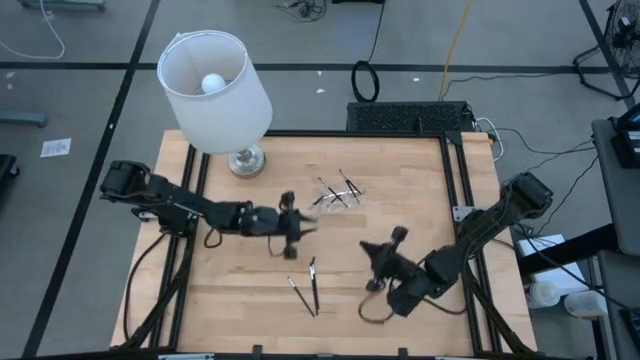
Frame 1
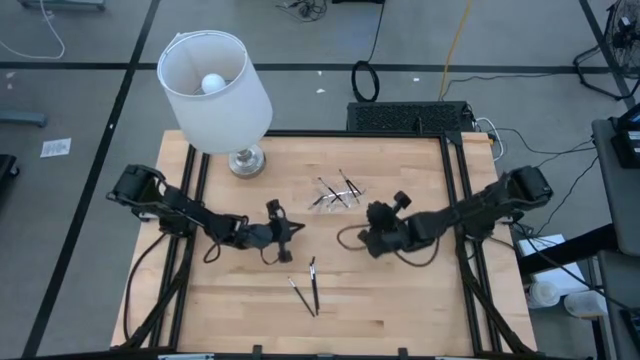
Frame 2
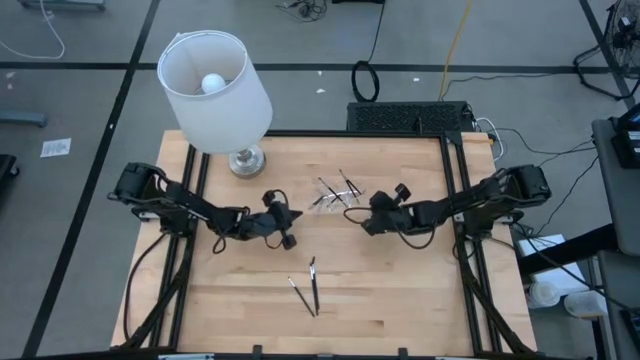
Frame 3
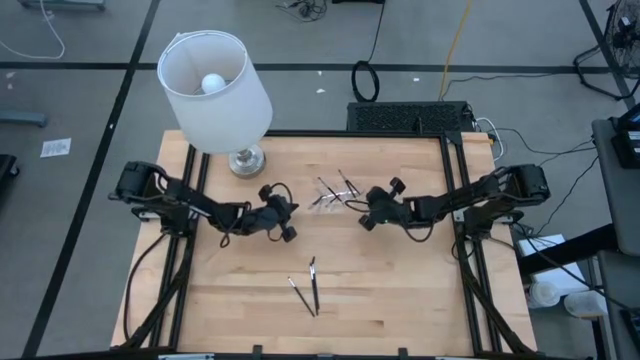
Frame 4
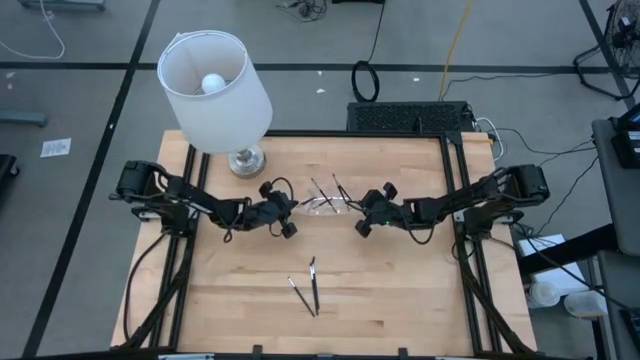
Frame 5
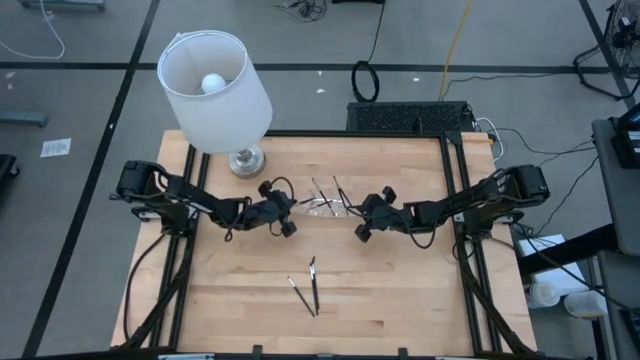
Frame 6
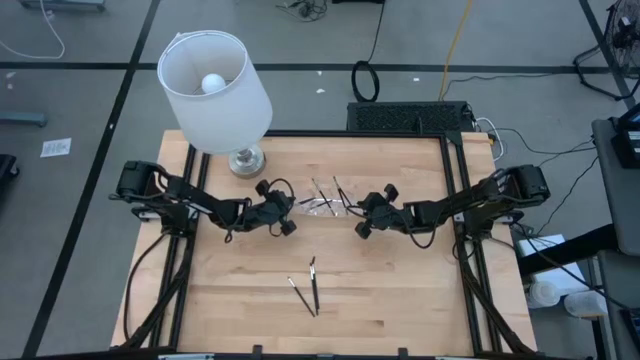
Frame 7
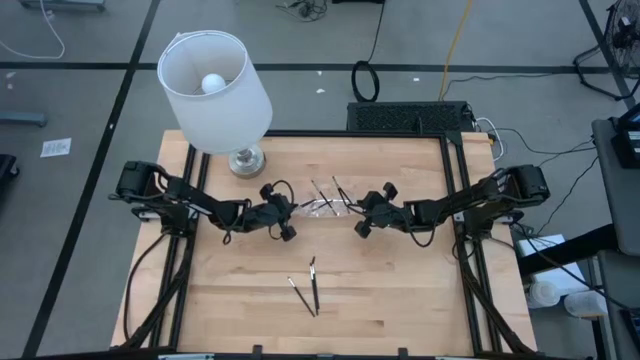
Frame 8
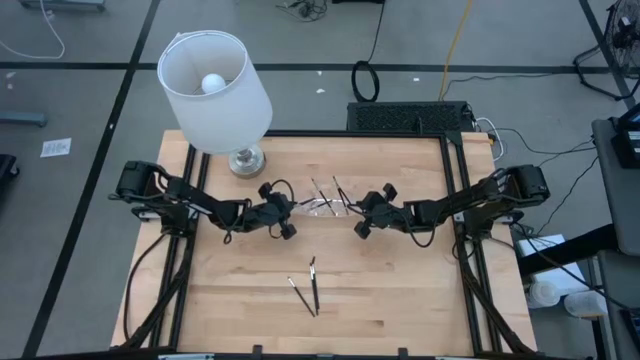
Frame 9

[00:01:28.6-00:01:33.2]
Task: Put items in baskets/containers
Adjust the transparent organizer

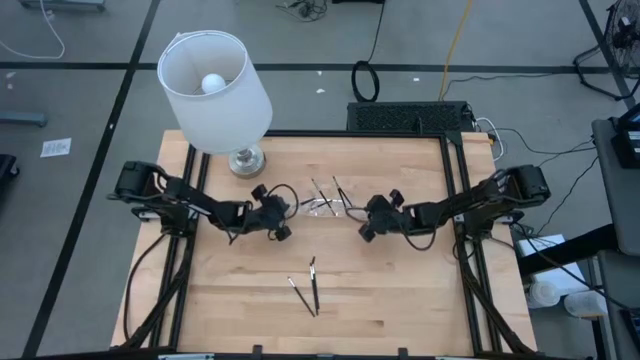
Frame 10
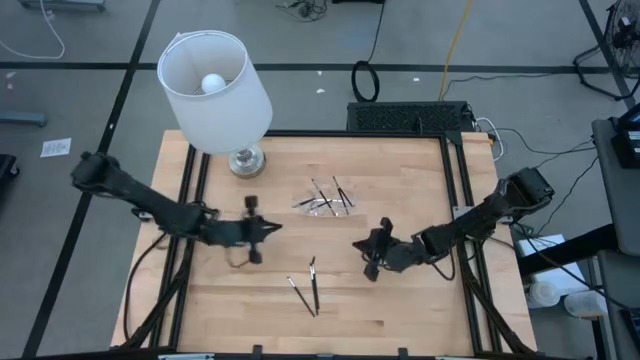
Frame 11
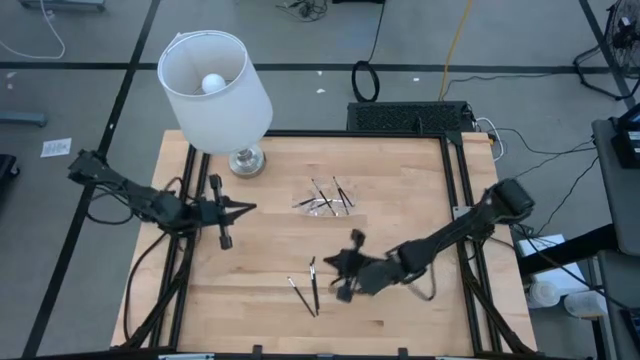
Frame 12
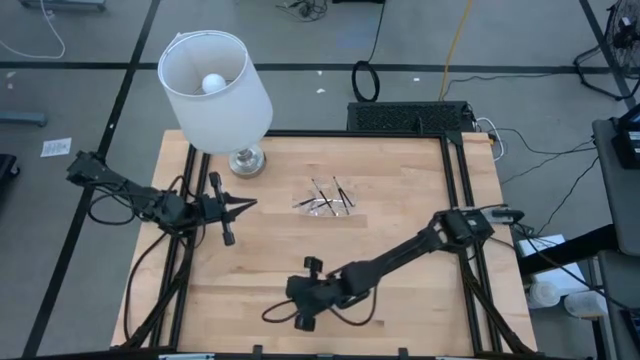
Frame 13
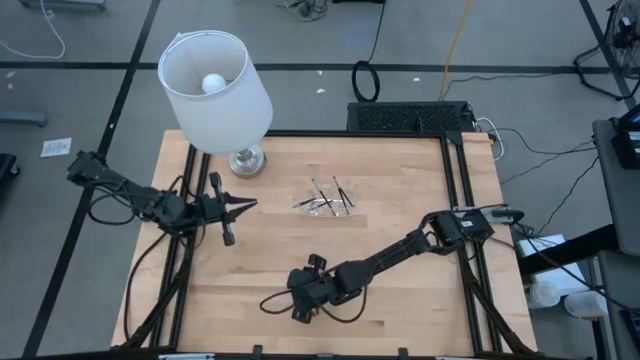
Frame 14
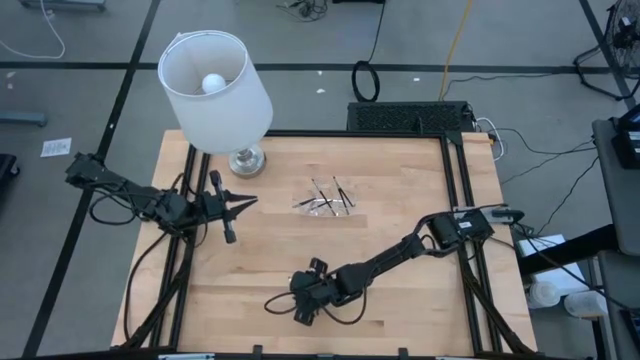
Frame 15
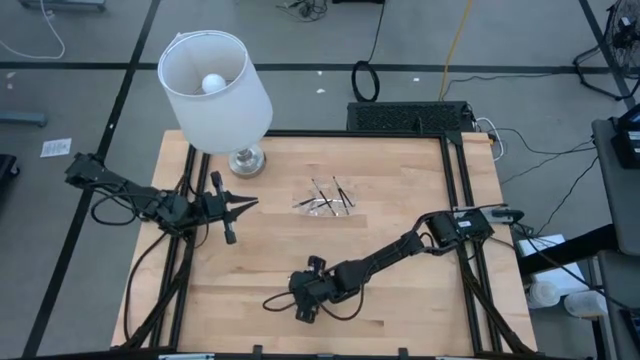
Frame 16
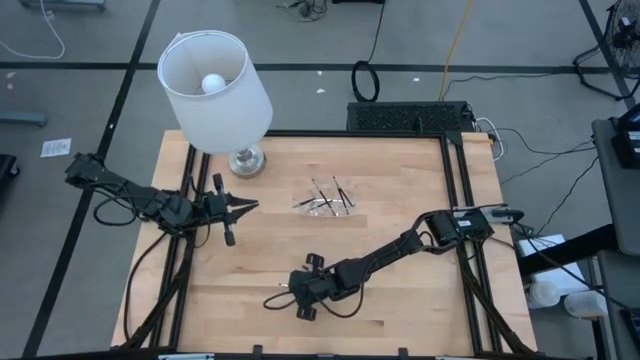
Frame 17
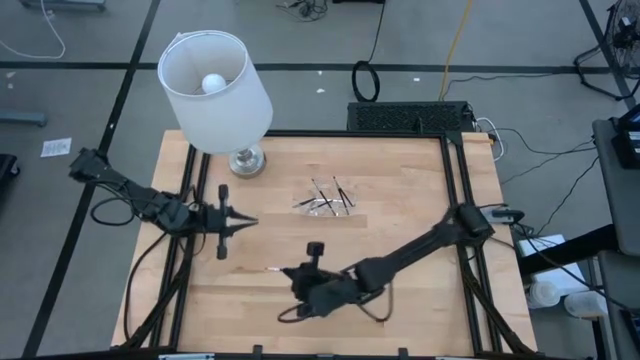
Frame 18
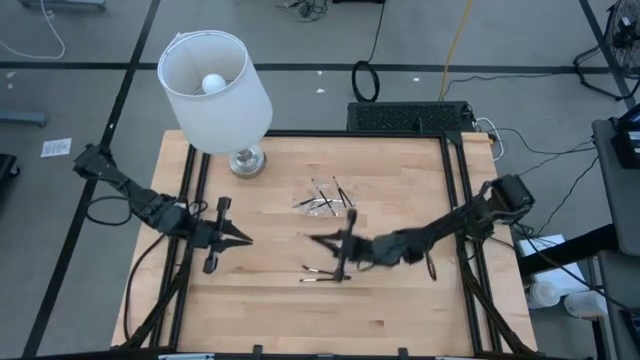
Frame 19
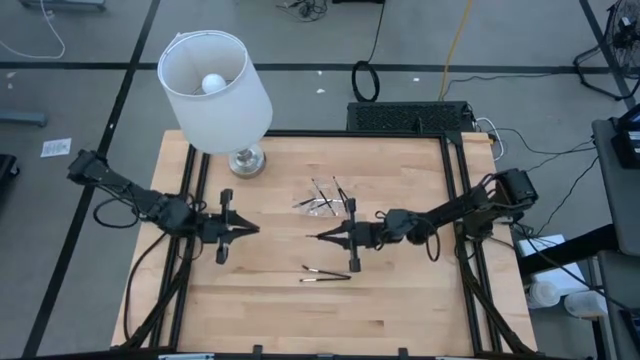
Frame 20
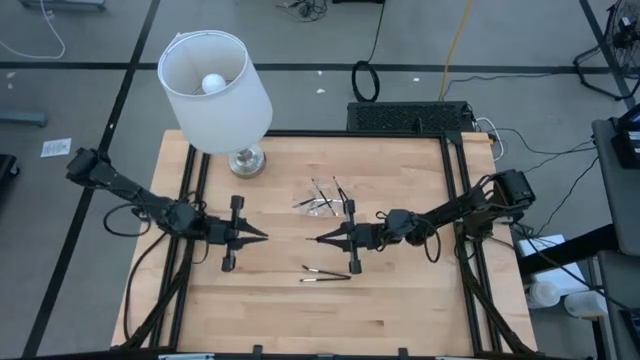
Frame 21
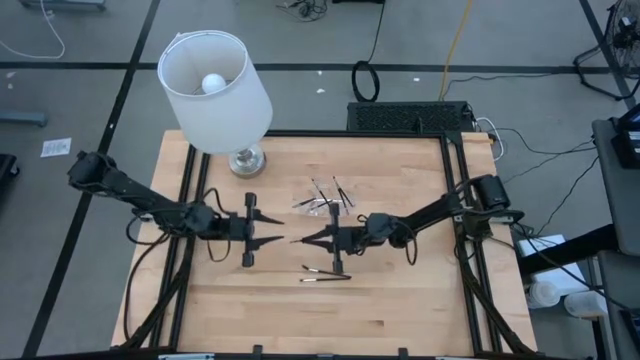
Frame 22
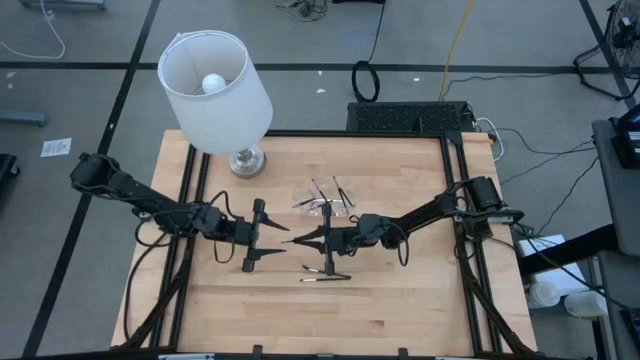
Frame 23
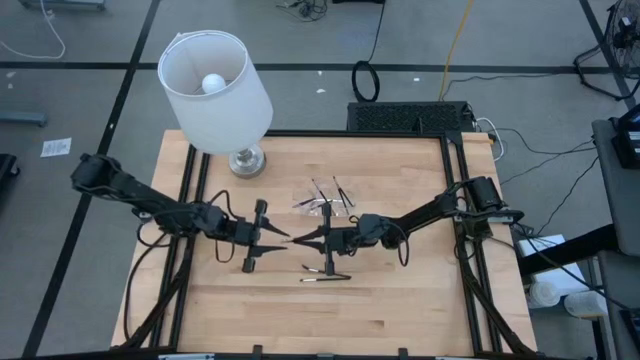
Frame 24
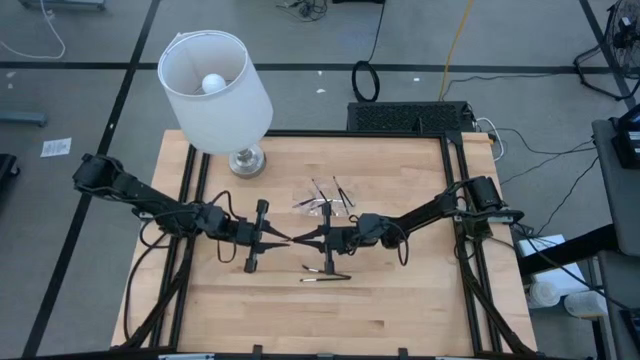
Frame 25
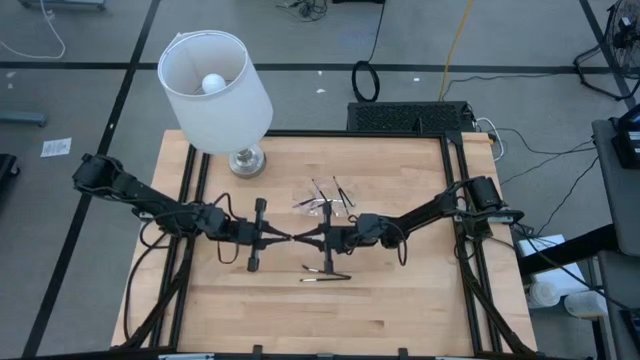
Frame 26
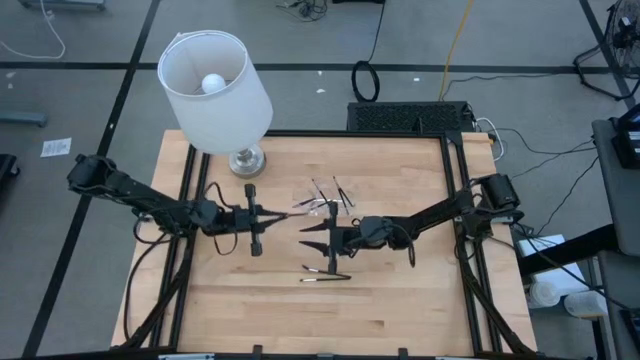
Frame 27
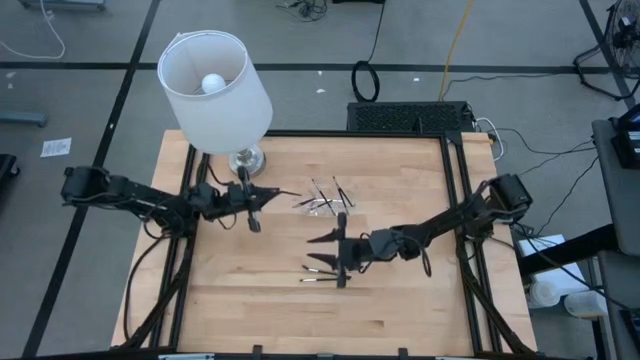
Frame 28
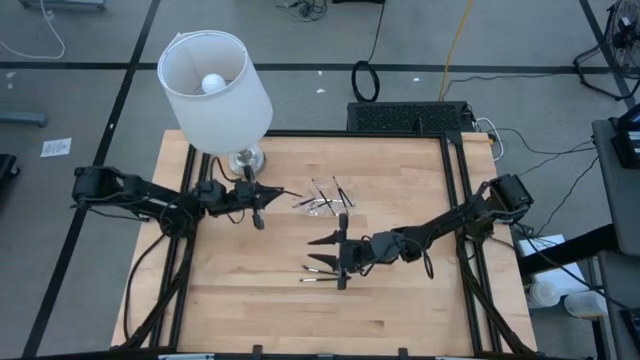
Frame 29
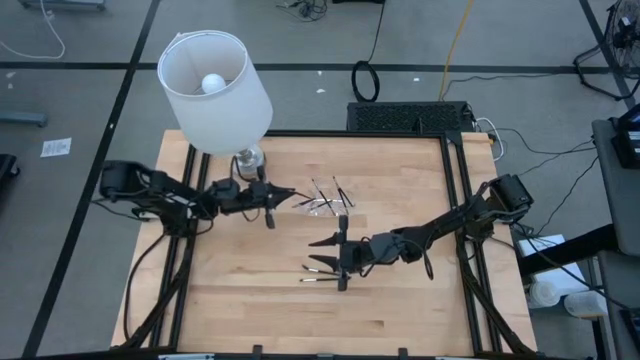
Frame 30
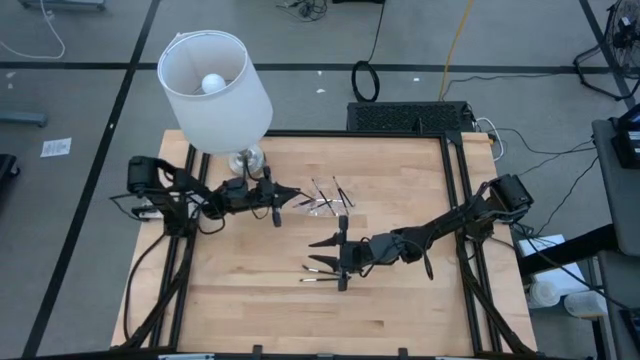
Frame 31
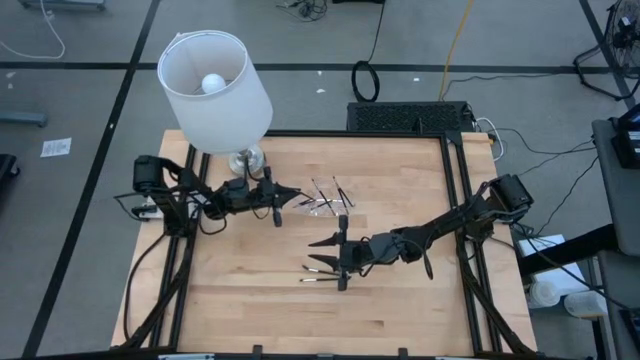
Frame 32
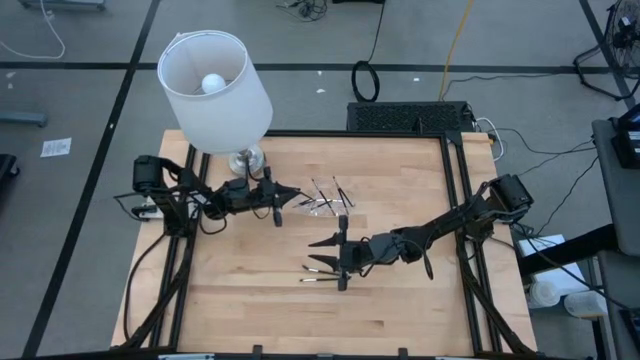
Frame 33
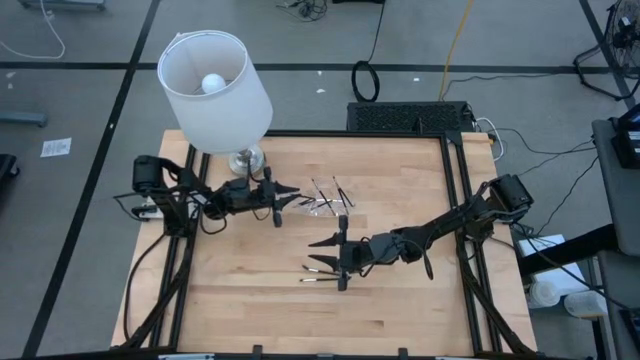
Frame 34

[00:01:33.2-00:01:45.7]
Put the eyeshadow brush into the transparent organizer

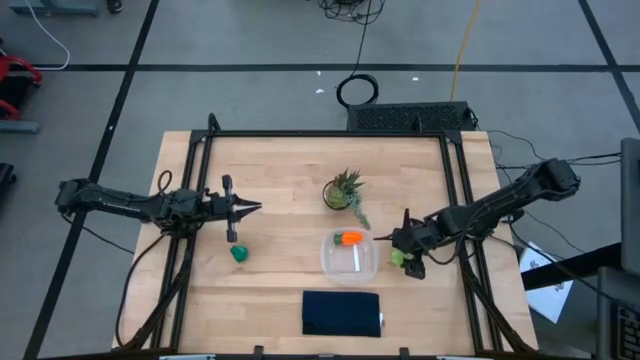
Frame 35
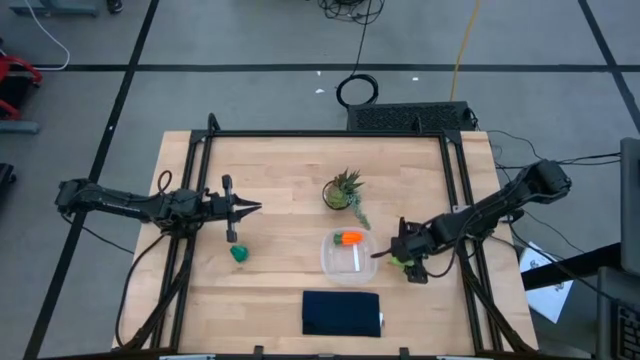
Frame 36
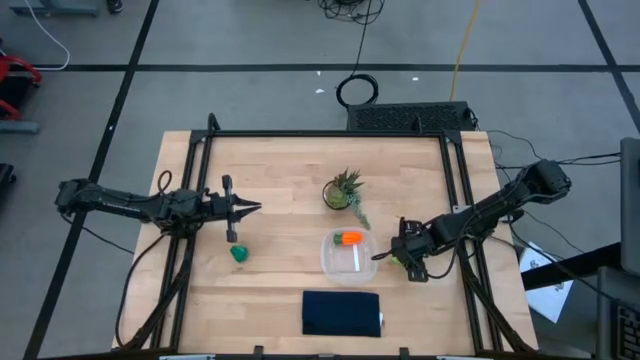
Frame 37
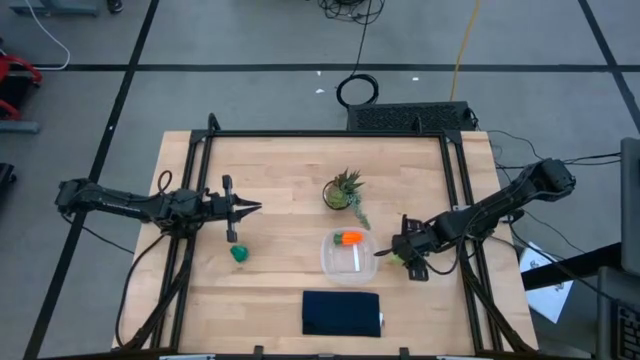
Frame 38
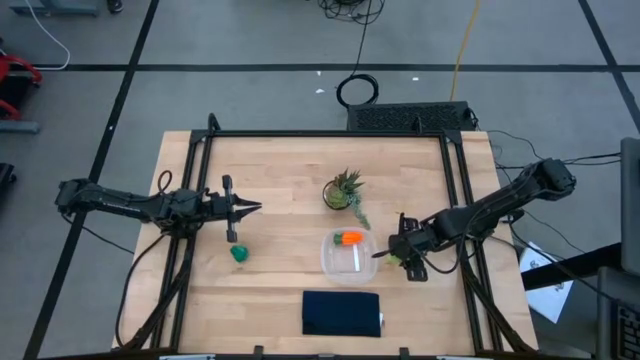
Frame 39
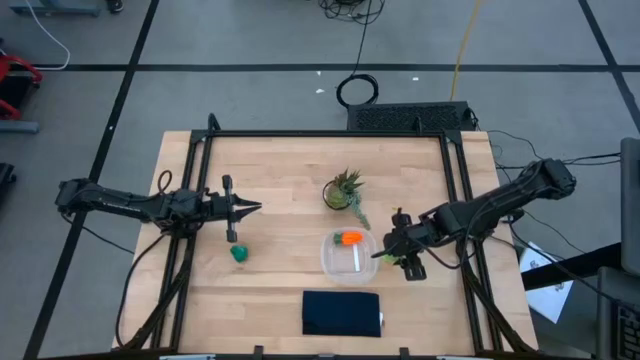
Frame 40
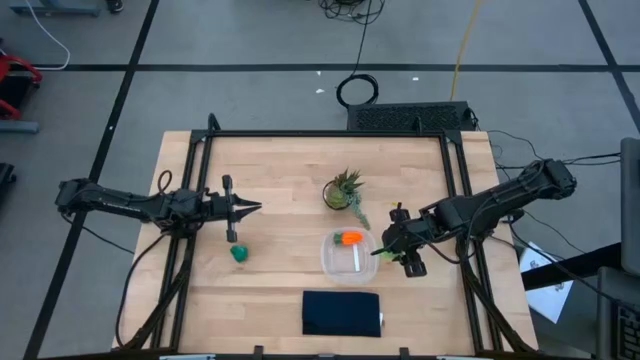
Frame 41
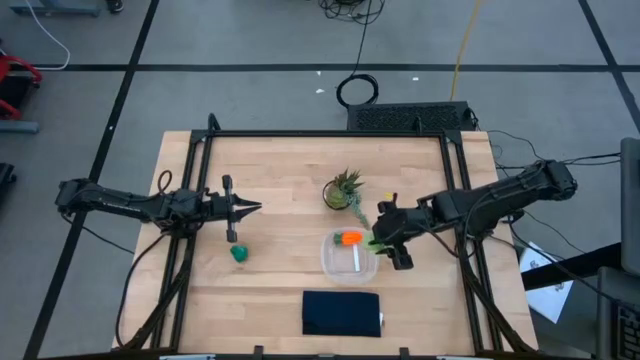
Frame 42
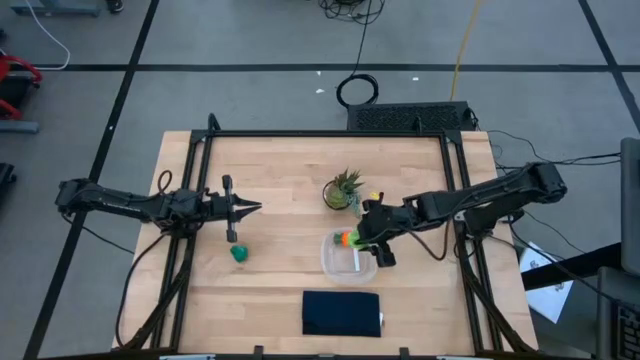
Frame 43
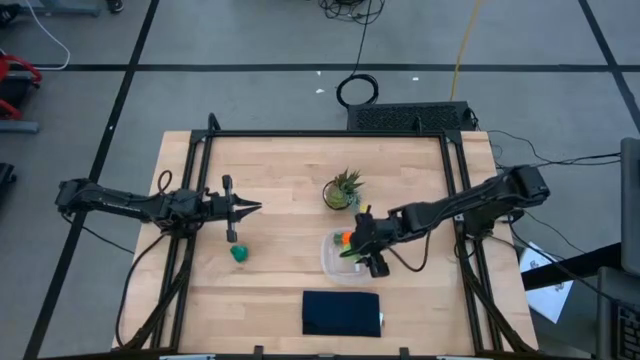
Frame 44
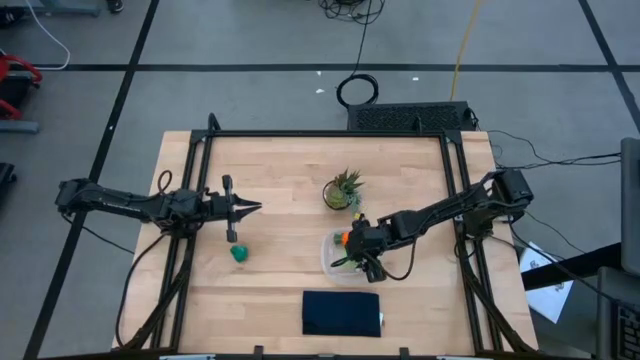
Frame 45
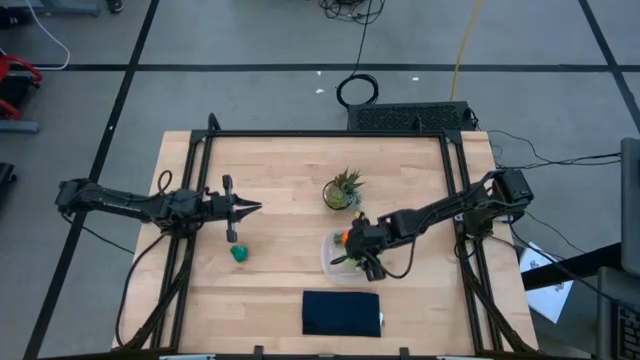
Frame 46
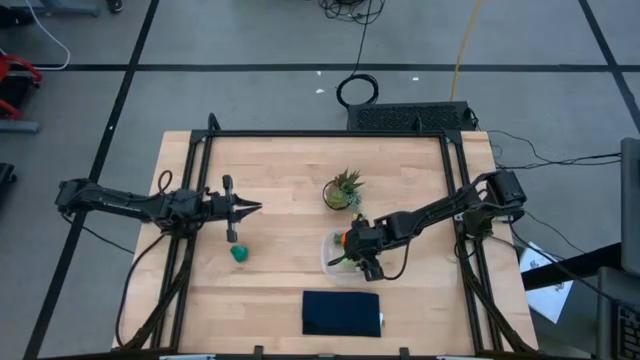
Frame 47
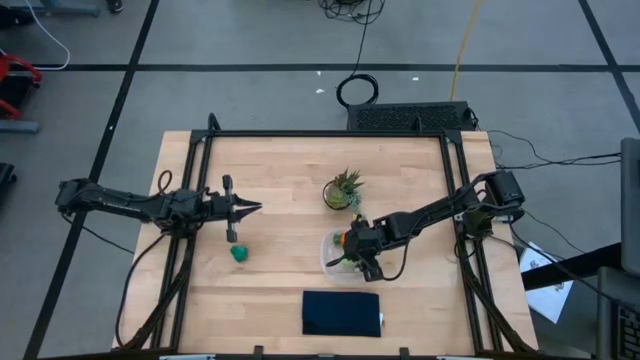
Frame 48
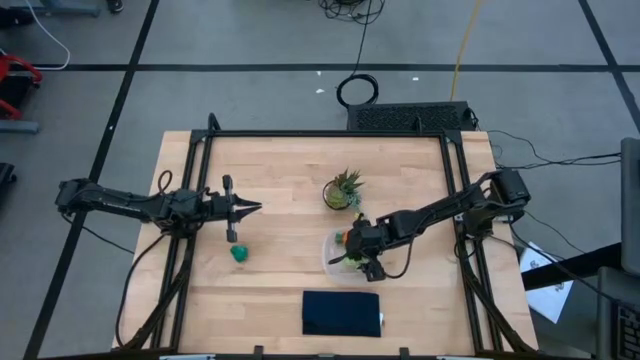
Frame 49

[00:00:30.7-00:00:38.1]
Task: Pick and placing Produce into tupperware
Put the green starfruit into the transparent bin
